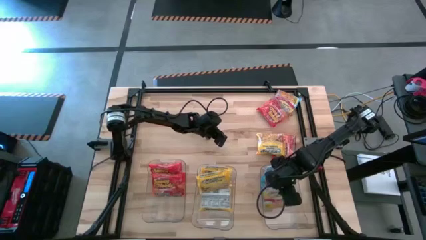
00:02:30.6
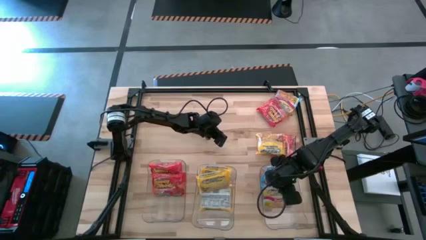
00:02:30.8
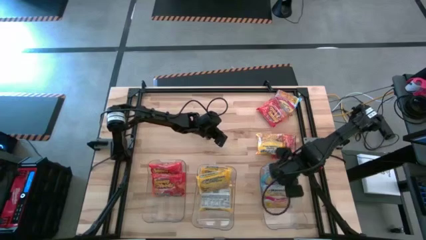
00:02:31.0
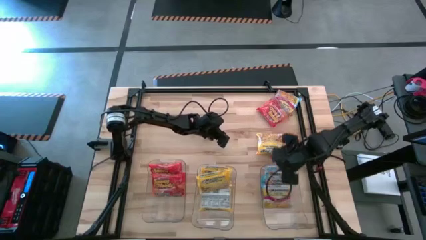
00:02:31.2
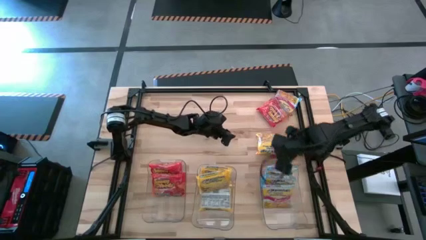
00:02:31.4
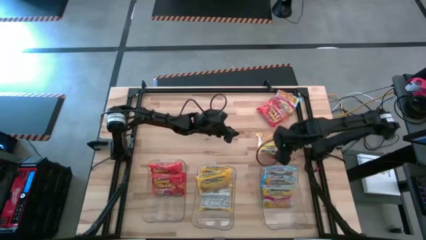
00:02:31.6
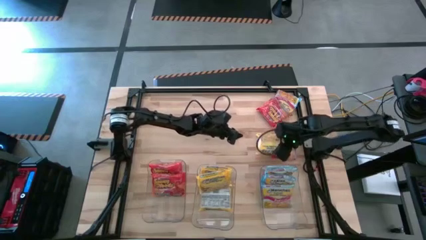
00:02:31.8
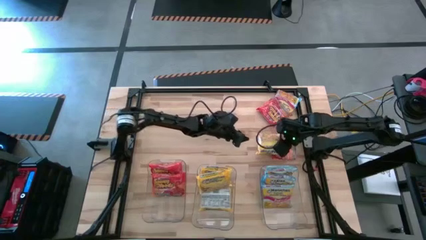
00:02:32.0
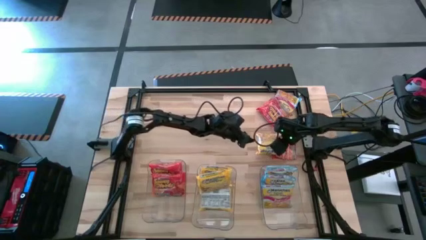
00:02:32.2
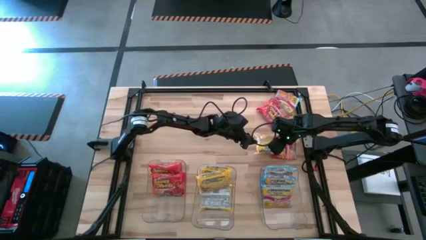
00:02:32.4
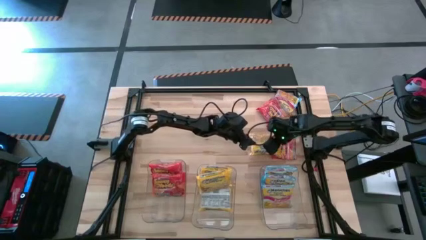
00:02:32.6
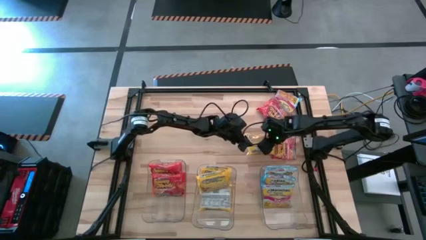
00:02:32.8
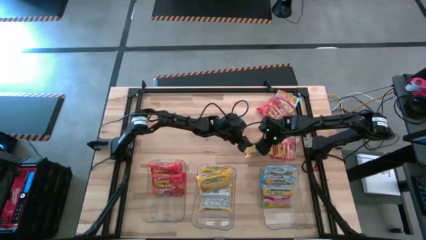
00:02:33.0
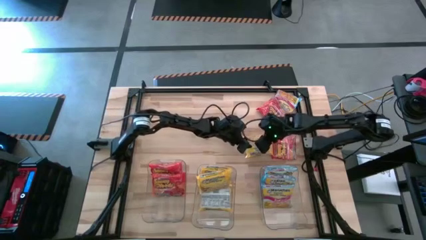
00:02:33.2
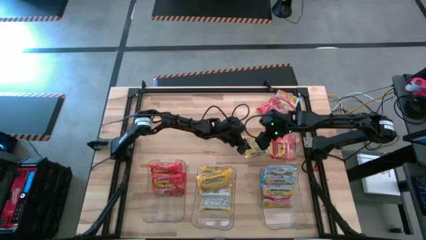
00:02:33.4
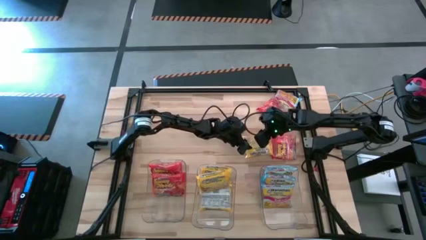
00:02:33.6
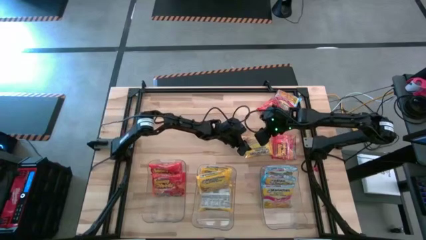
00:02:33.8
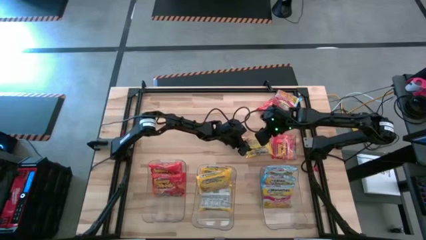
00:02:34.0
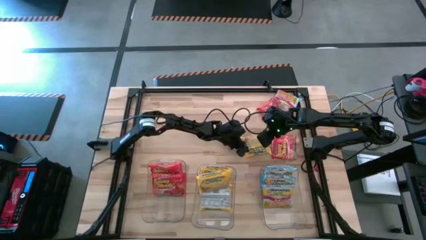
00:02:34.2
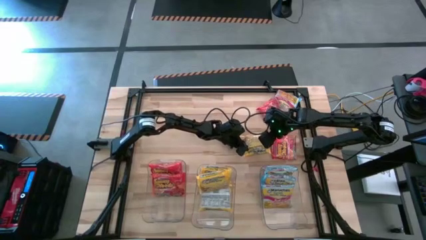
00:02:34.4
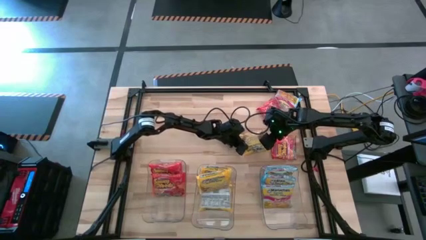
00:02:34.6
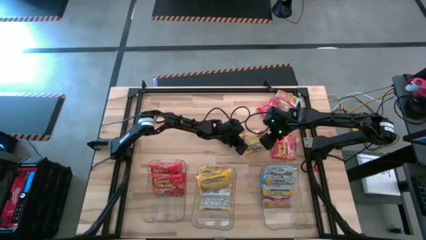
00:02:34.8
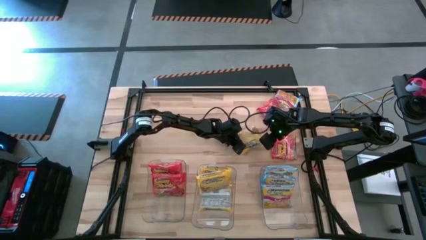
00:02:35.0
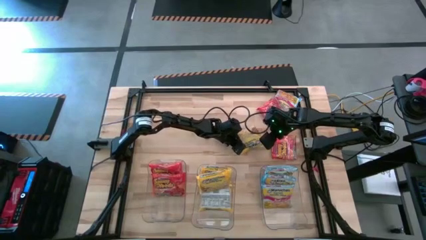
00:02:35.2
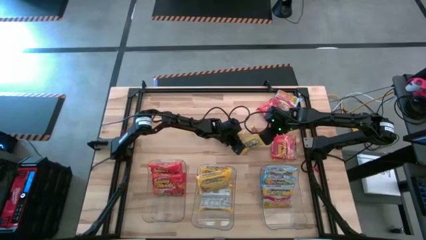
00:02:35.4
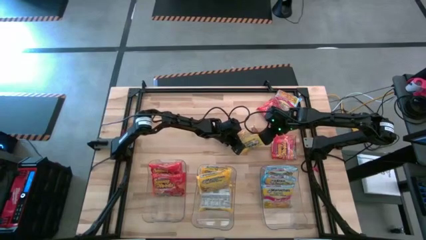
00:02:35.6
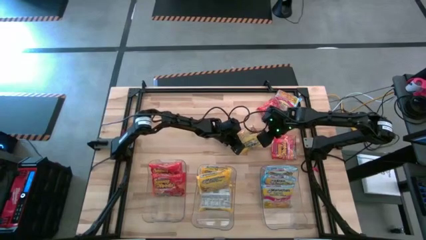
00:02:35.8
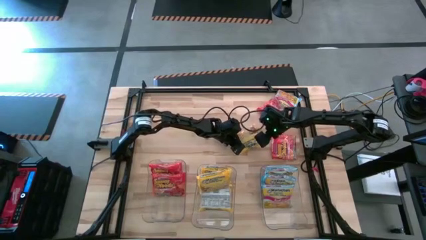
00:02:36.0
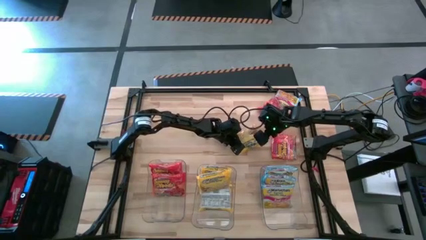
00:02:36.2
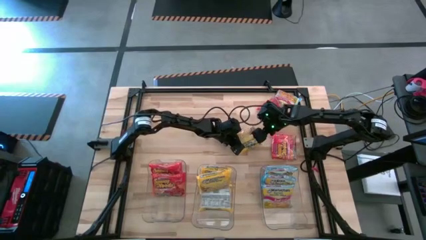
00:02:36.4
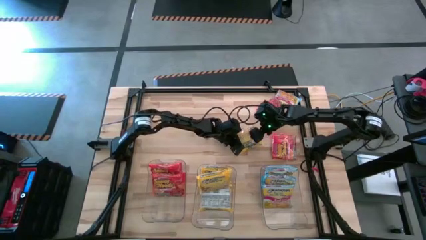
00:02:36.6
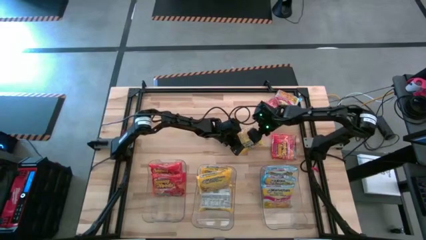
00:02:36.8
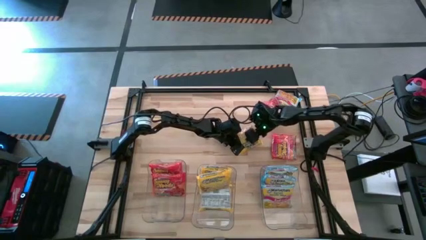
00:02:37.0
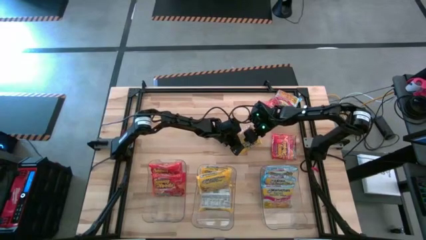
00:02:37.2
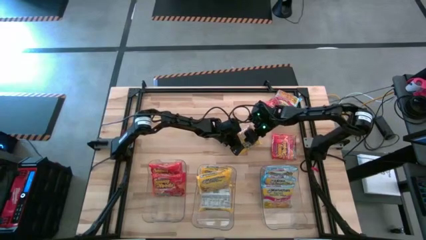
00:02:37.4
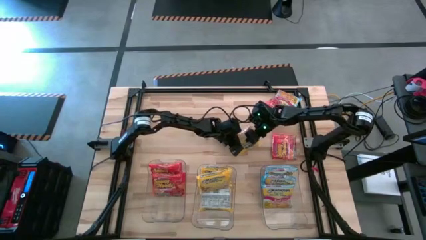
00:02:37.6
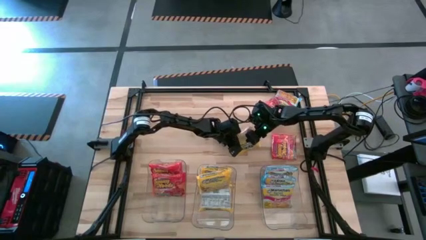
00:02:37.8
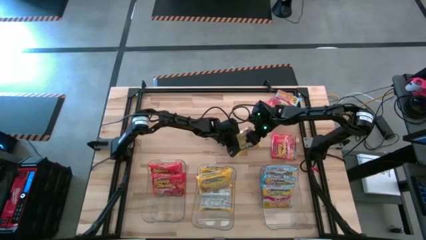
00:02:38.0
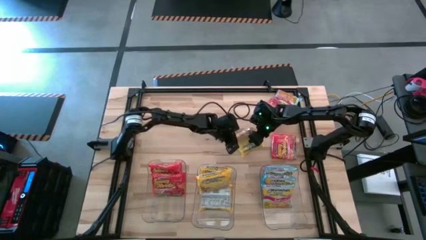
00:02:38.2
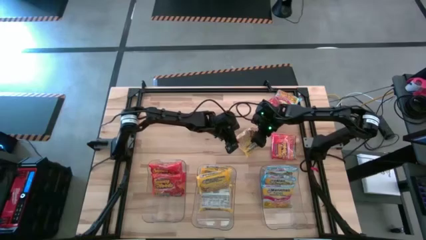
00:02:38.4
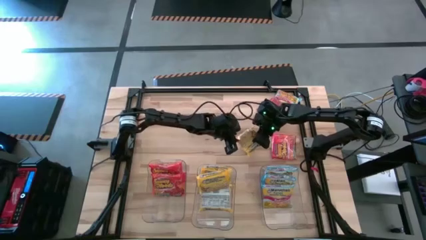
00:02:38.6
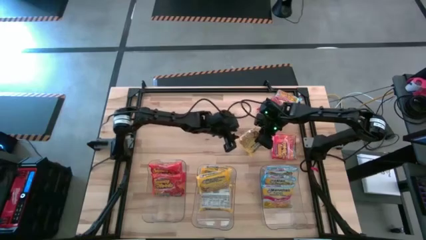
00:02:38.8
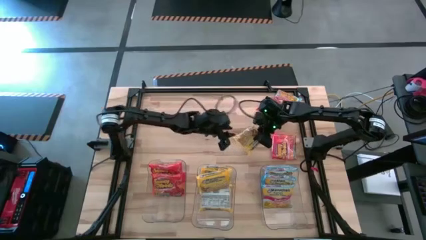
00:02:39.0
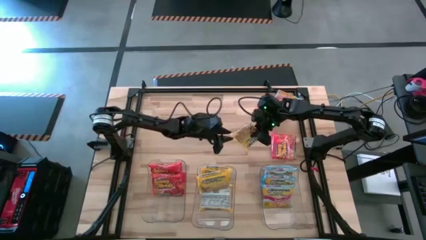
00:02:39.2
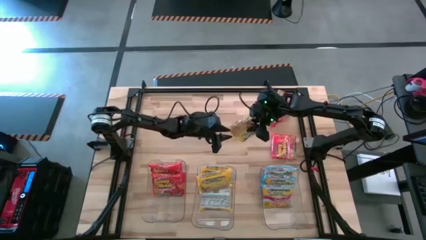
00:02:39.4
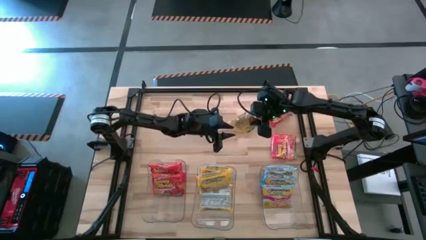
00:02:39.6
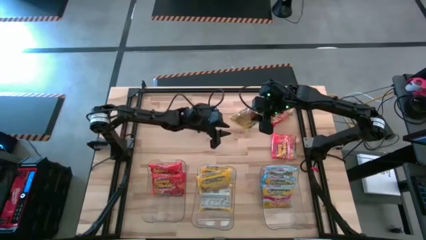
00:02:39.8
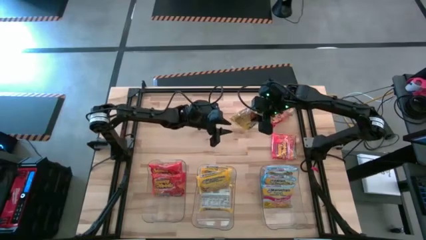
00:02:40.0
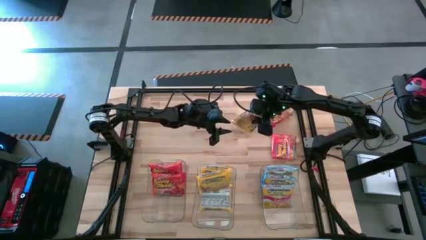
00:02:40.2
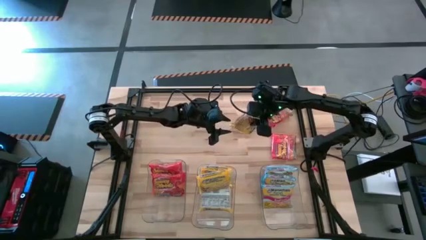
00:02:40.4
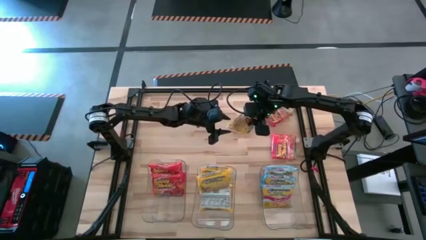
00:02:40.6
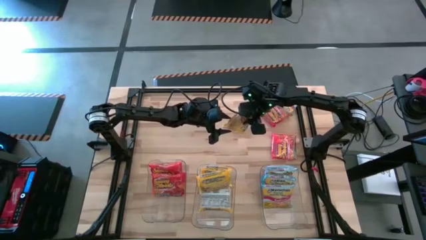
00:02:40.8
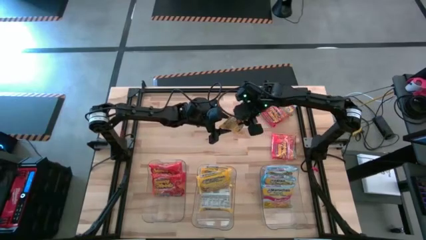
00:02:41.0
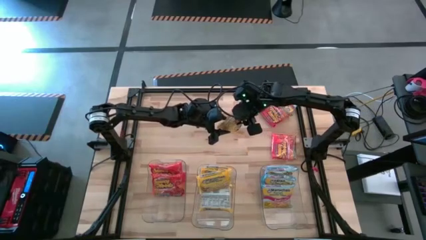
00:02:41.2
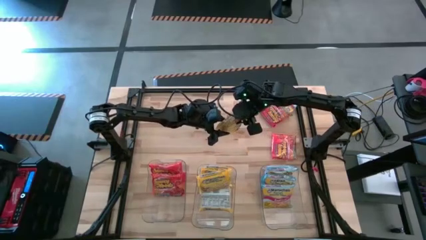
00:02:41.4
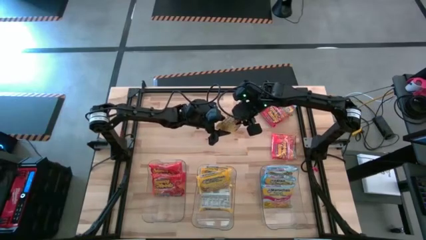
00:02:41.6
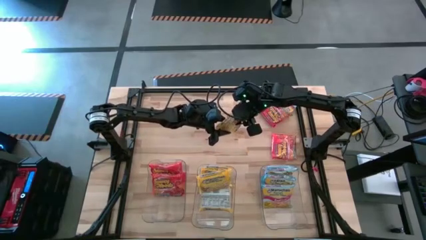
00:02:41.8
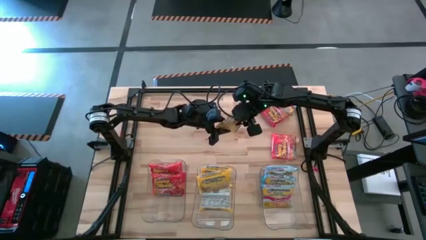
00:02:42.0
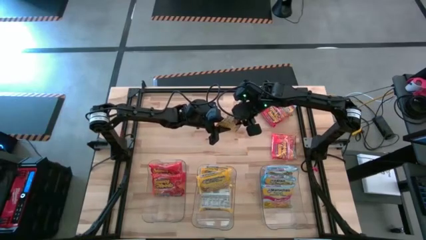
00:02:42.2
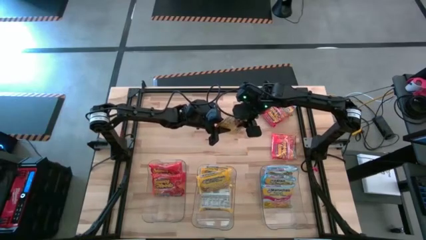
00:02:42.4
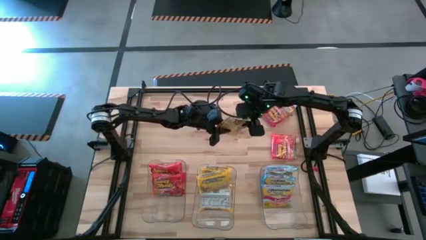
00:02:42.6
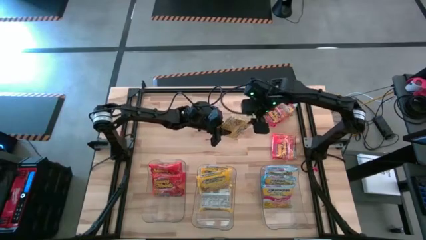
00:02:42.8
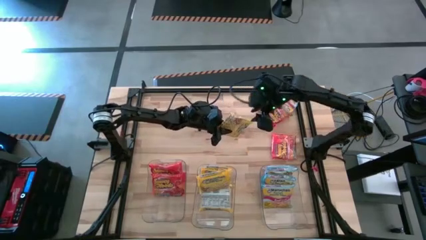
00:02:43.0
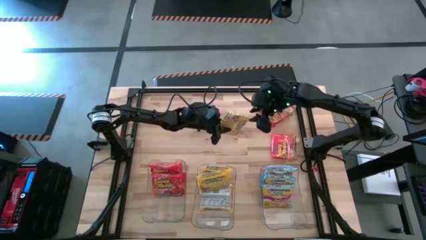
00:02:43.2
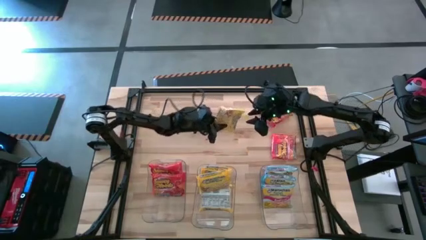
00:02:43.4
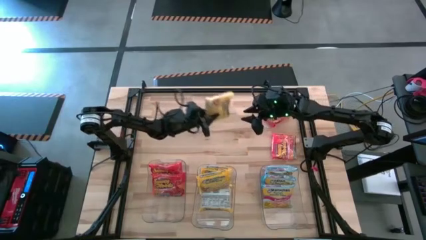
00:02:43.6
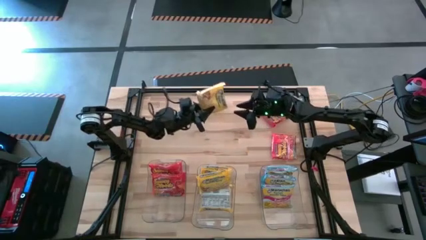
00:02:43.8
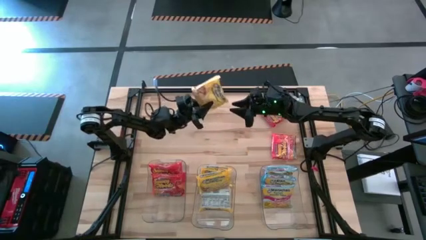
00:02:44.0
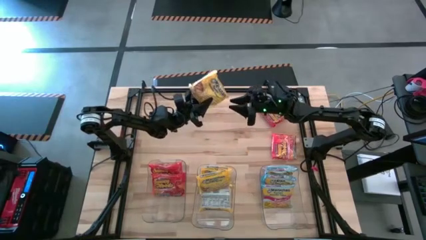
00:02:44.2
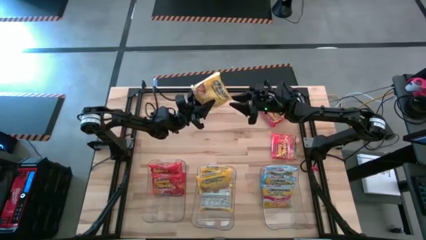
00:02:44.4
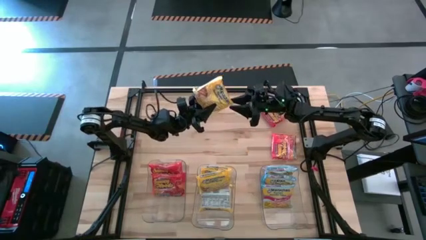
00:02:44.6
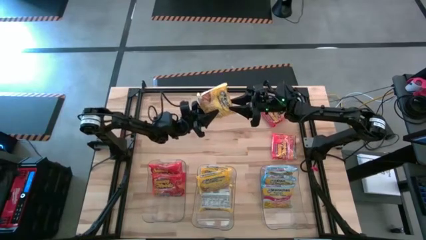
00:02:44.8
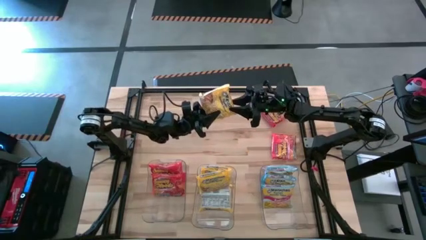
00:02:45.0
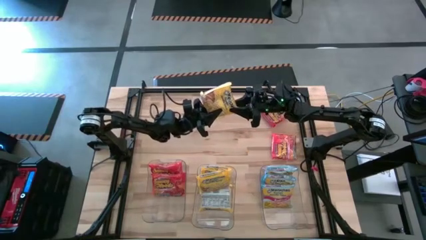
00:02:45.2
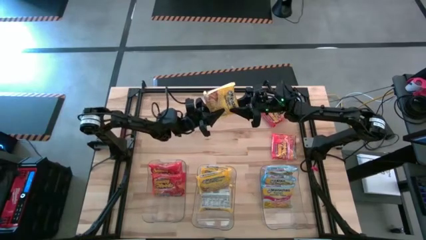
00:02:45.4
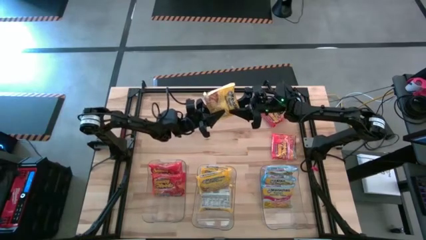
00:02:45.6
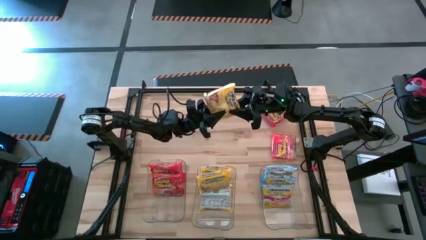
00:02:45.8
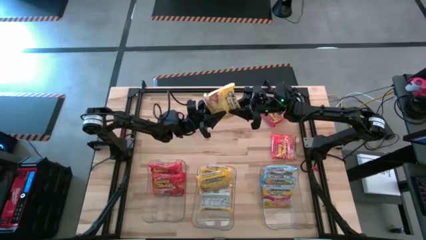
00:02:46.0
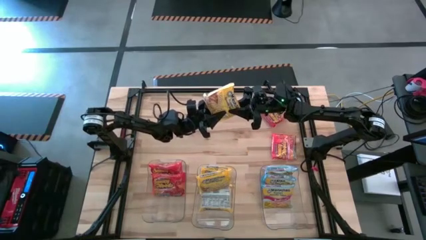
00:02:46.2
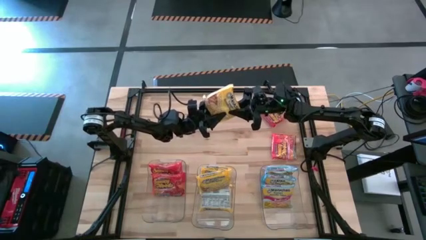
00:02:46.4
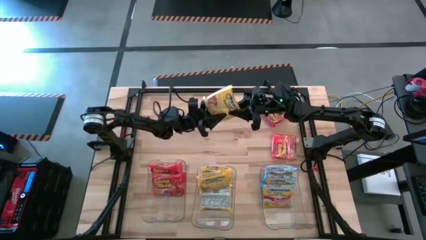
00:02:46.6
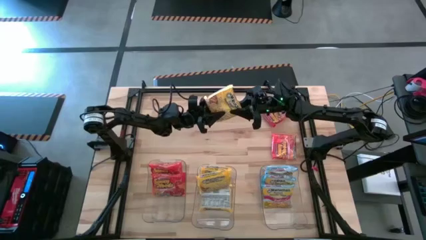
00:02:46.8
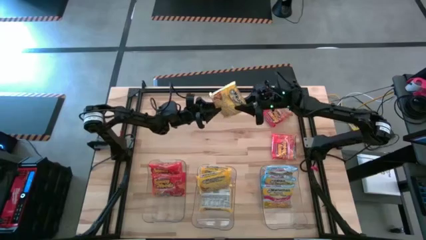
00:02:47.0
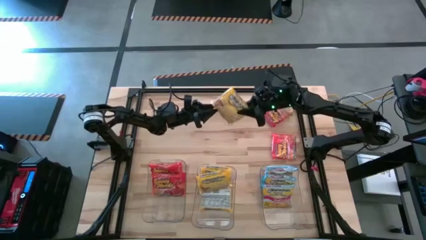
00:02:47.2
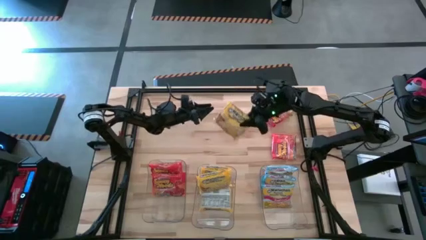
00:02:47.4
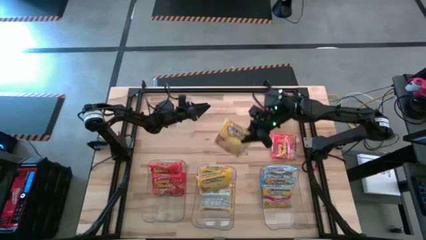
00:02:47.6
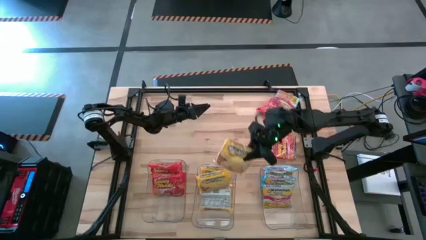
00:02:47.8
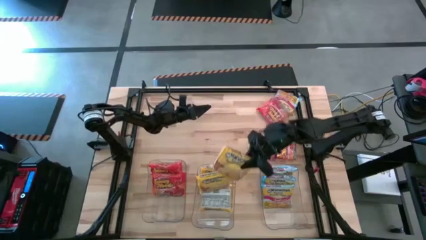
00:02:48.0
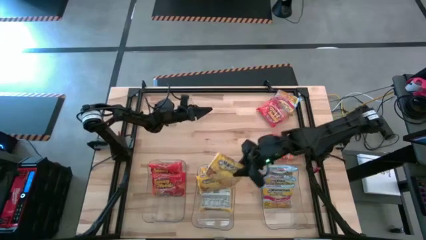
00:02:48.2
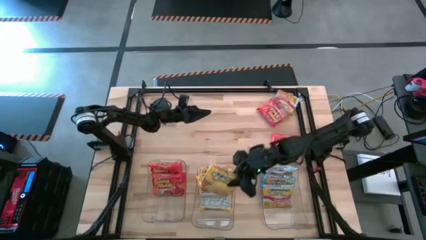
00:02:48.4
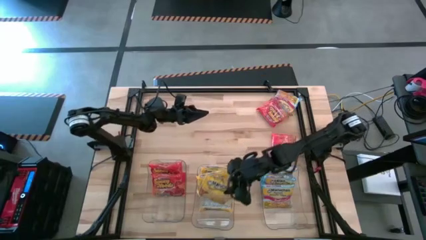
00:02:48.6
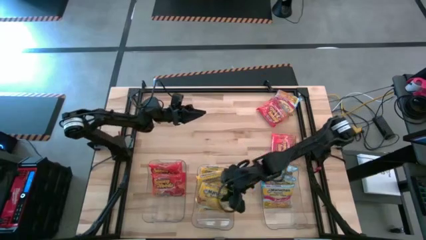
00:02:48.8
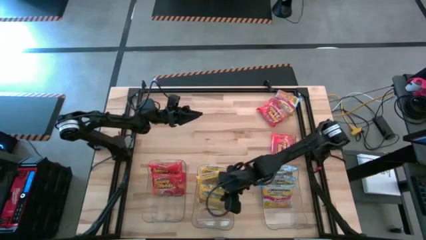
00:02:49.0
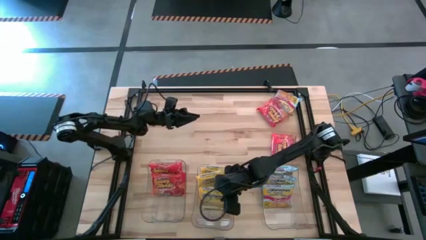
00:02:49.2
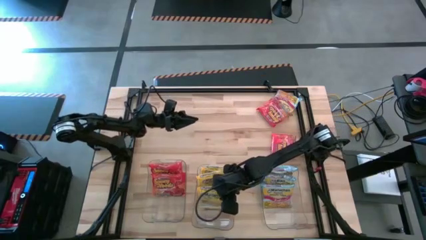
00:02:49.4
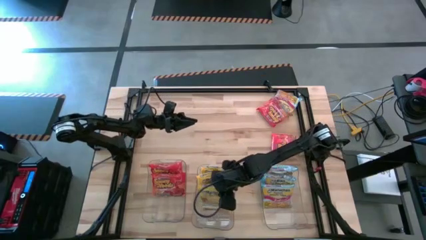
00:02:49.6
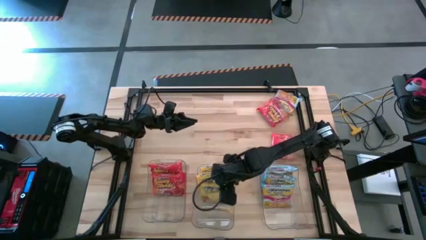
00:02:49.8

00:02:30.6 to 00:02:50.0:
Task: Sort Maruchan noodles
Put the yellow noodle pack into the middle transparent bin
